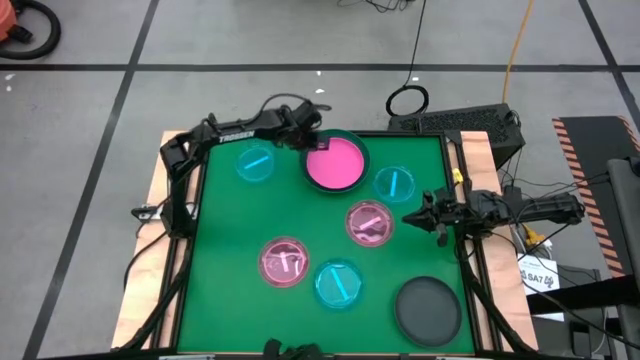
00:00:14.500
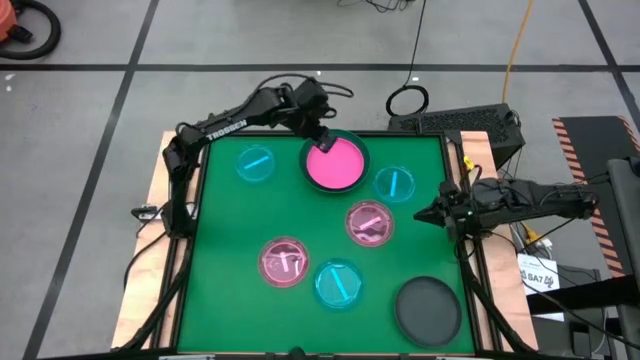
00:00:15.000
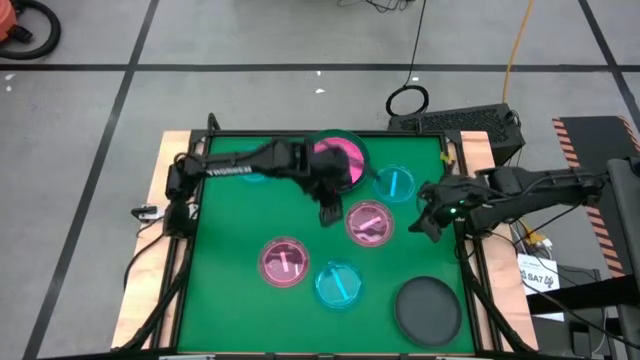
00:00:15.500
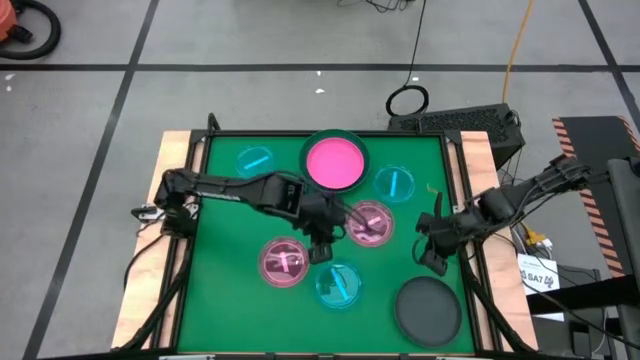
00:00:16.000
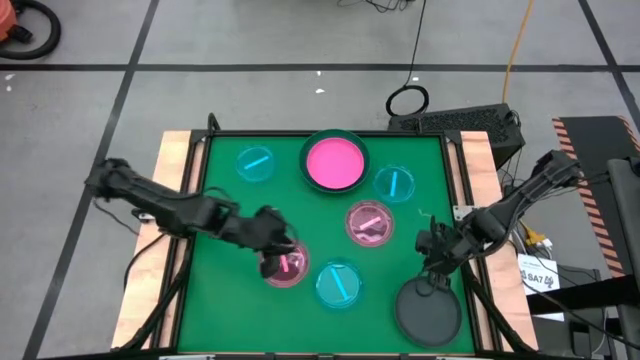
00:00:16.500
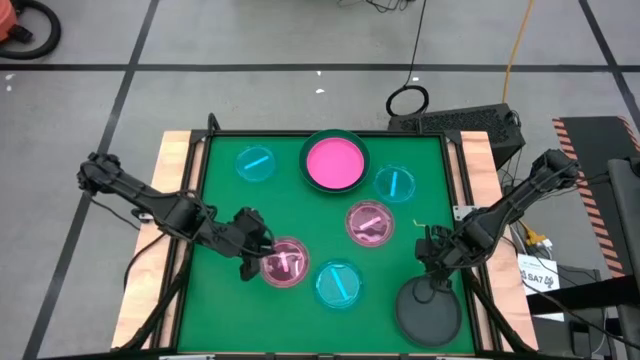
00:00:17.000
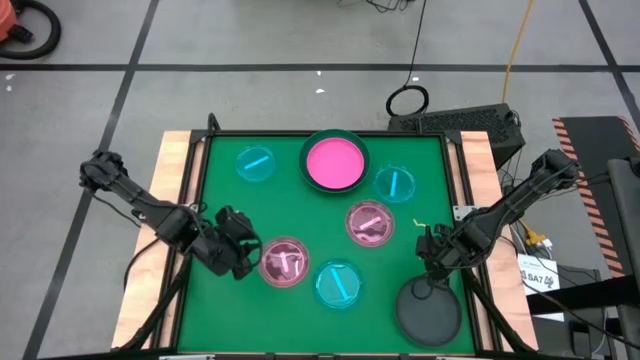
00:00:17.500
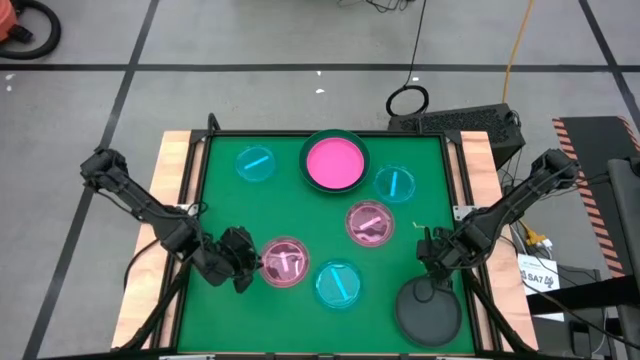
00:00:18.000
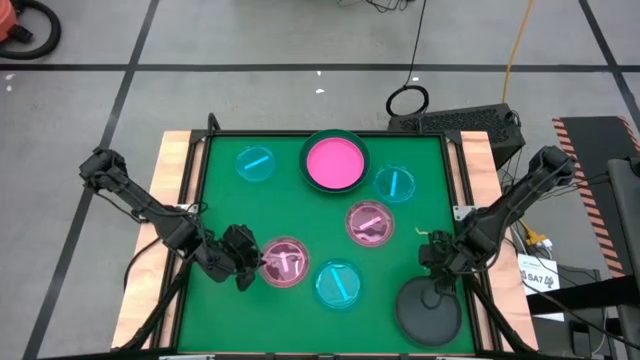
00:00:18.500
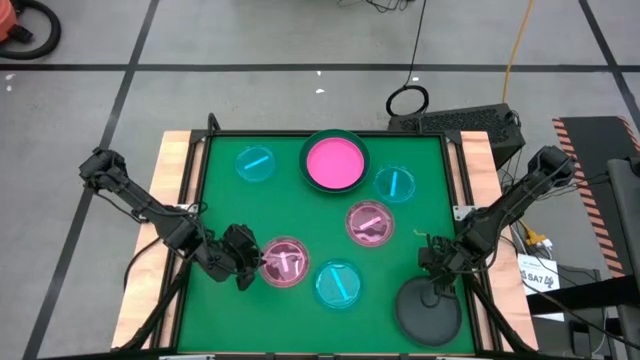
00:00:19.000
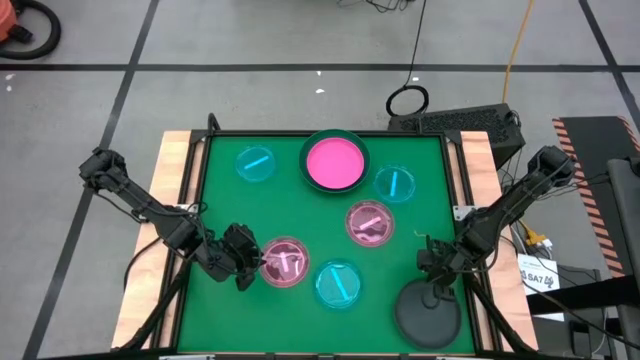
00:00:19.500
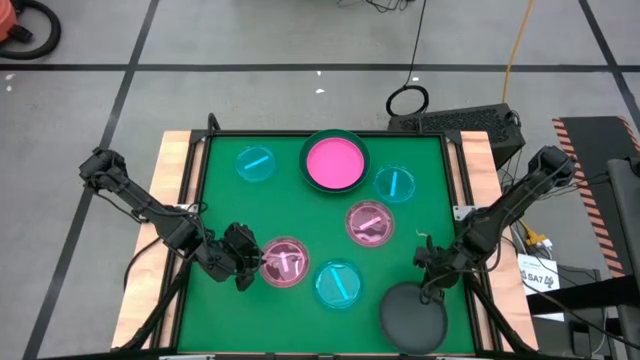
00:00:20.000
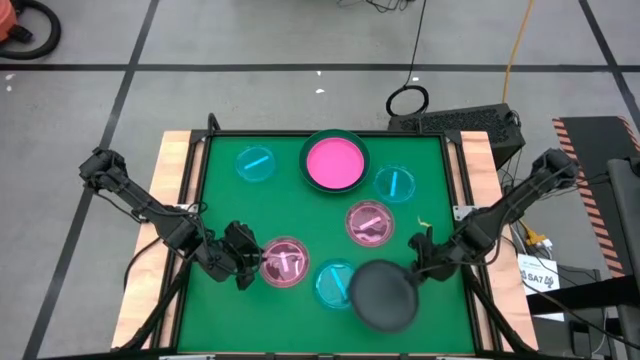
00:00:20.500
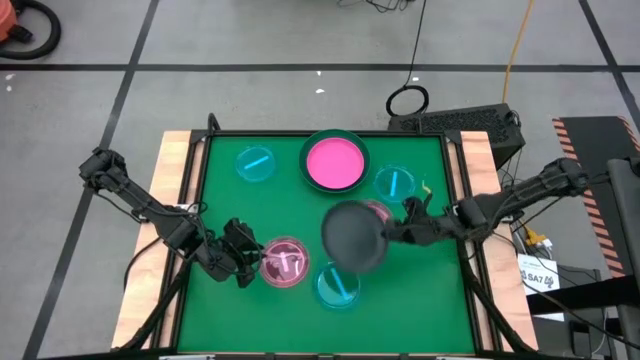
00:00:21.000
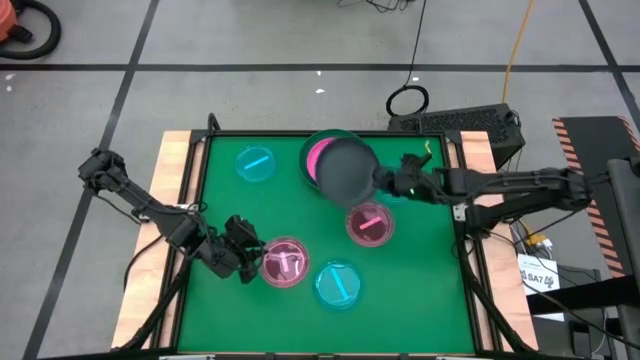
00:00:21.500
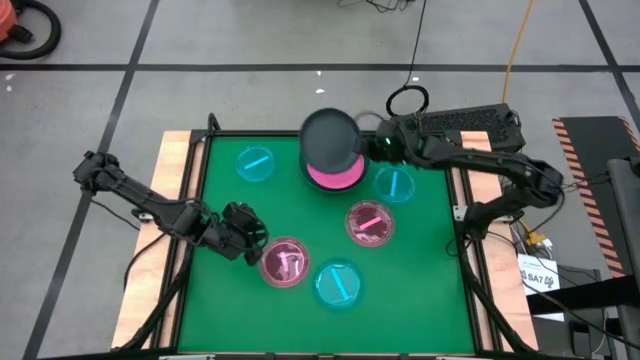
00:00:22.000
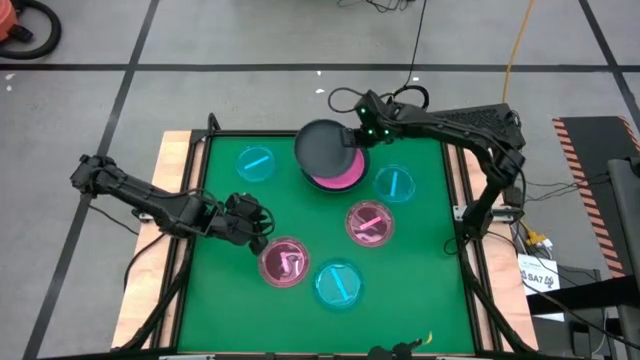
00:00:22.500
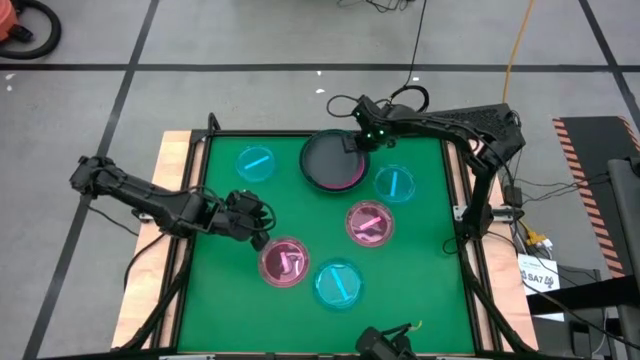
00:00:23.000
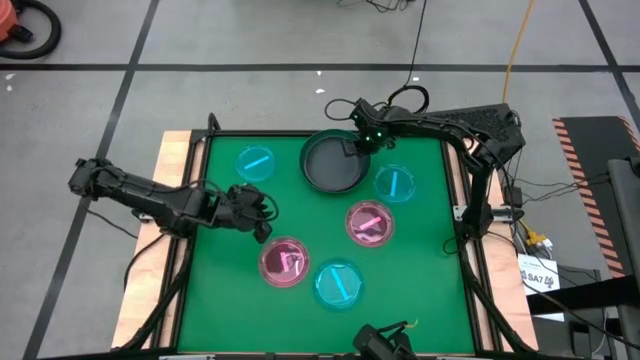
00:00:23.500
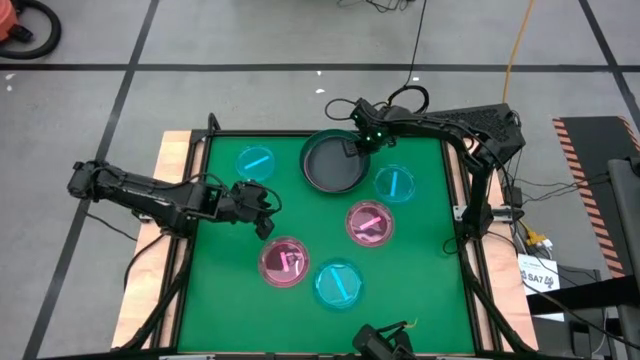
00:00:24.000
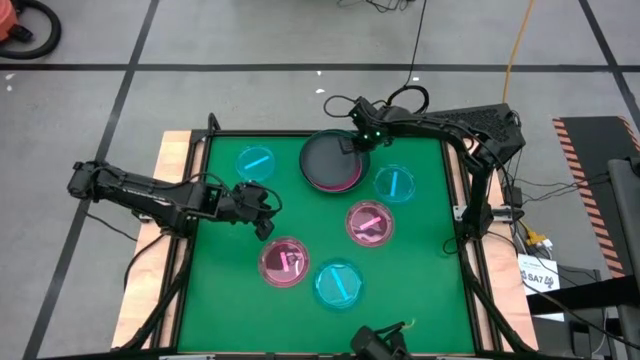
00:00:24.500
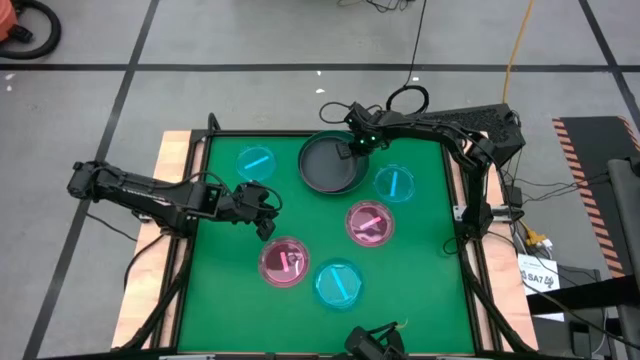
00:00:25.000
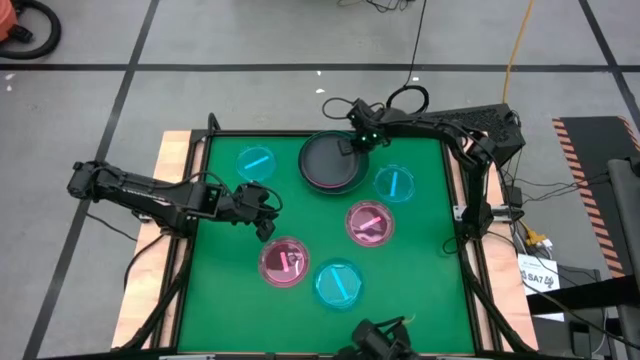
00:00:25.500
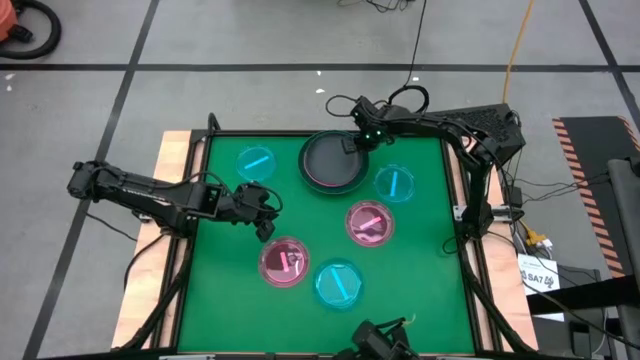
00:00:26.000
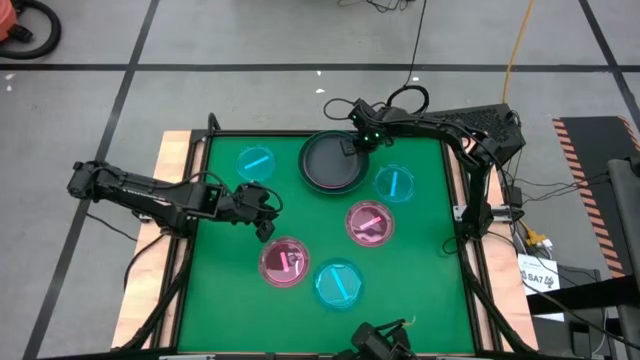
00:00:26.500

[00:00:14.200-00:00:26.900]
Task: Stack plastic plates
Stack the black plate on top of the pink plate

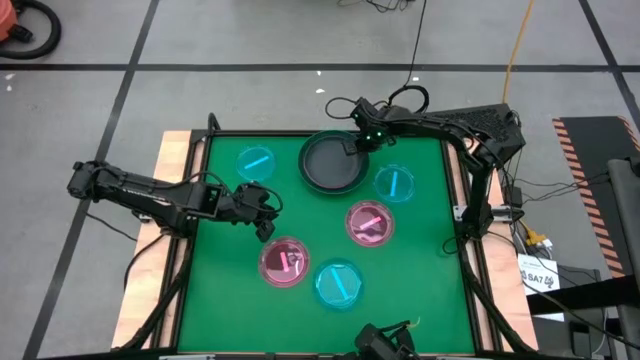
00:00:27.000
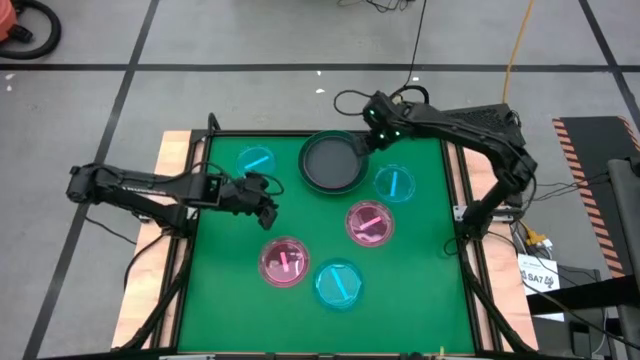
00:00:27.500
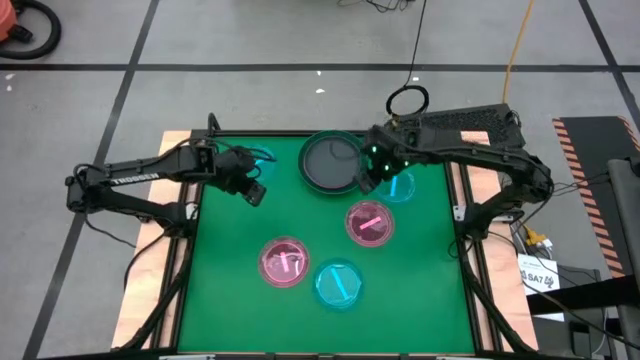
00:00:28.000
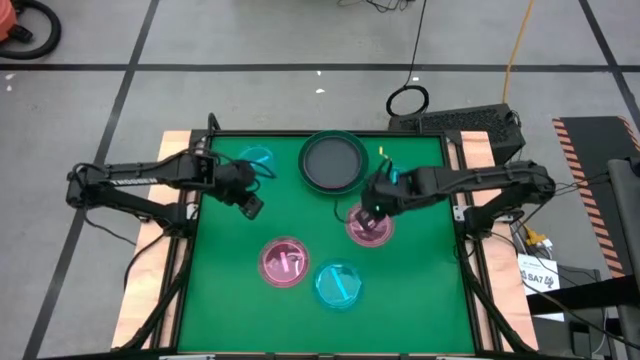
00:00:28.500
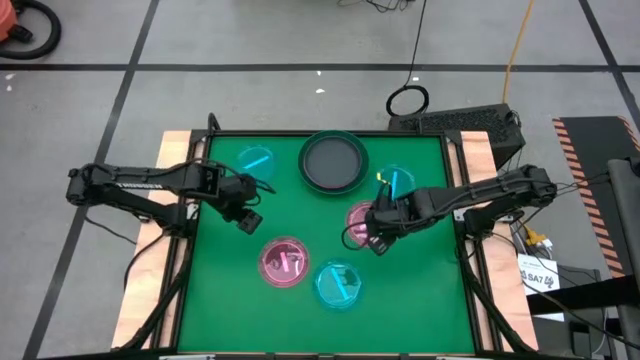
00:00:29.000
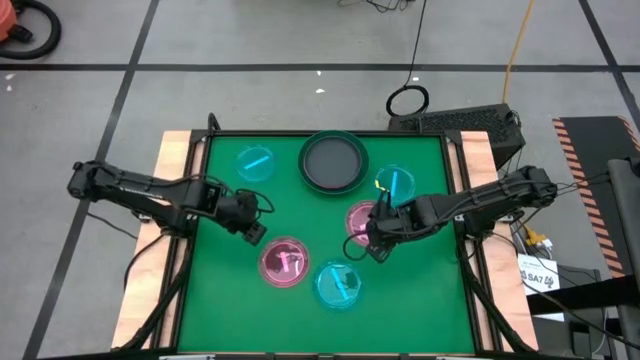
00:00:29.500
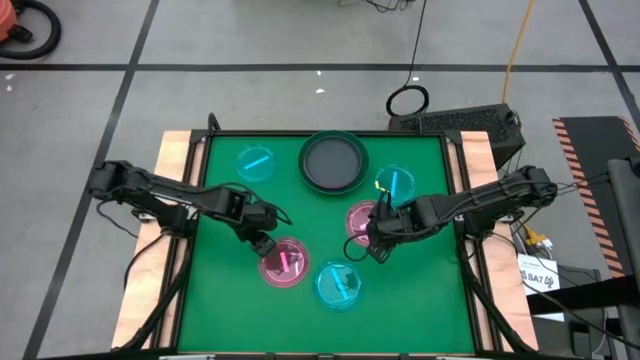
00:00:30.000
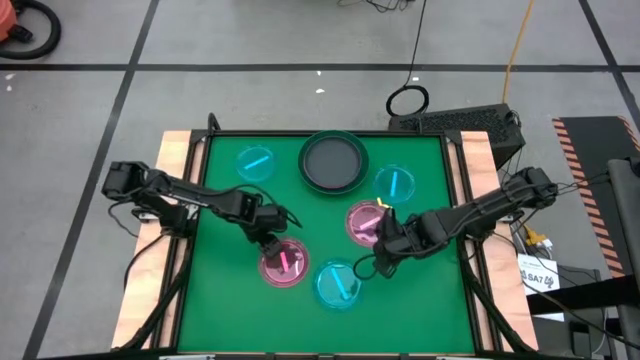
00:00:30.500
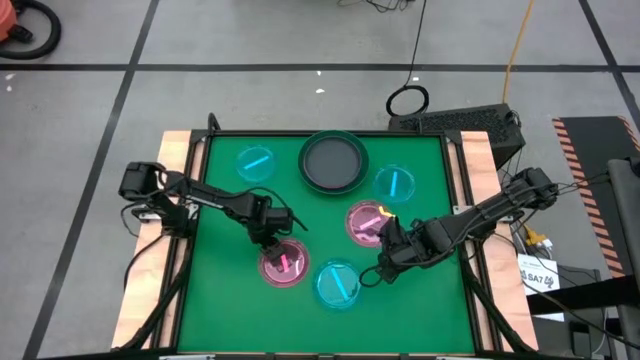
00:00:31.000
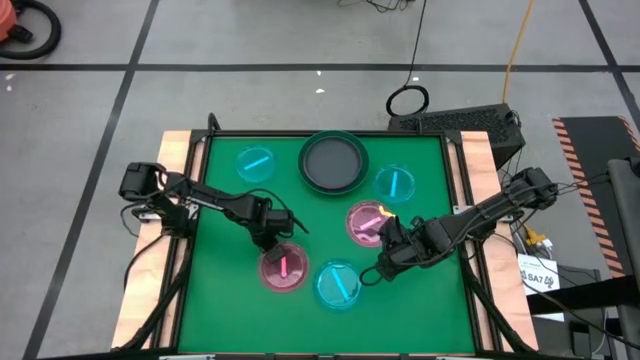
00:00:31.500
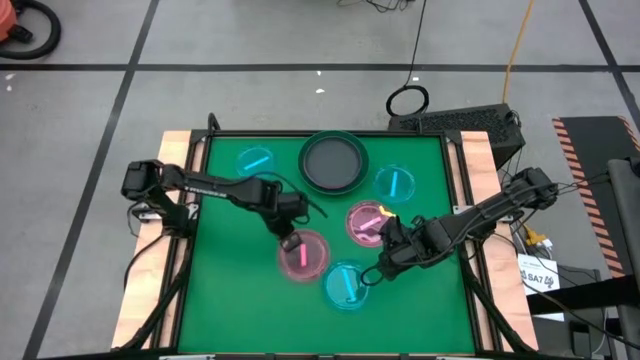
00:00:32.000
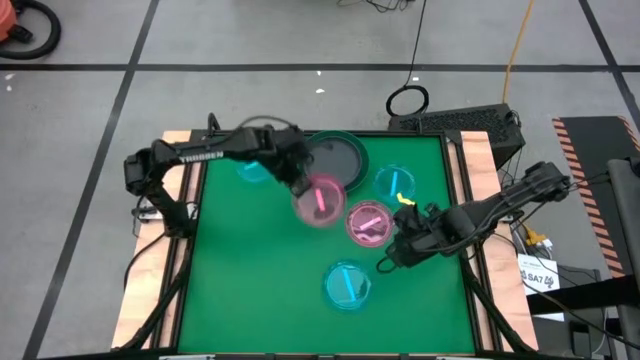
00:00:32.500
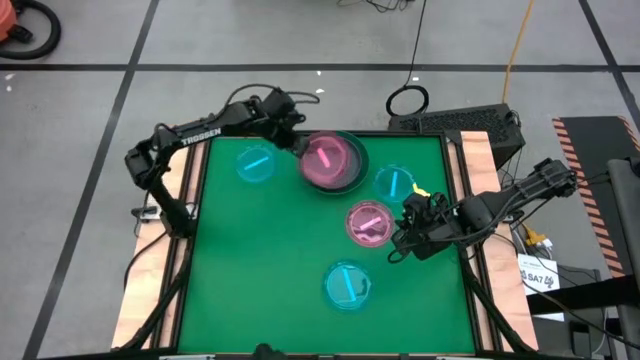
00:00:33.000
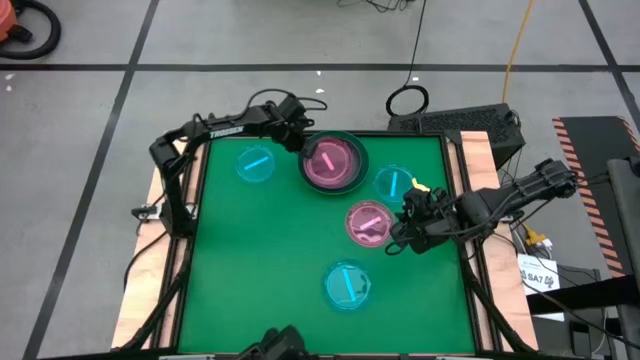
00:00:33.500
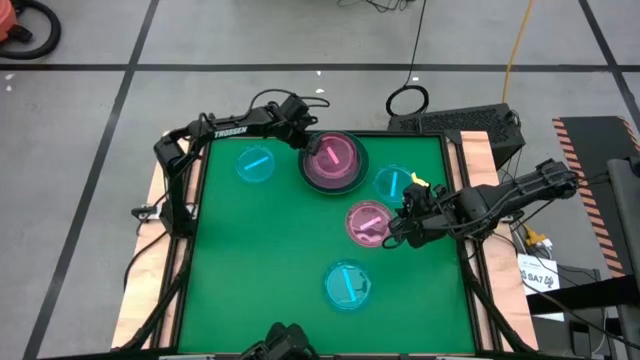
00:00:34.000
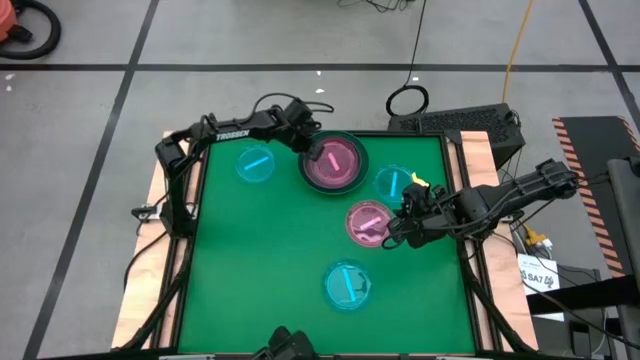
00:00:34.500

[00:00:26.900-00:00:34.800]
Stack the left pink plate on top of the black plate

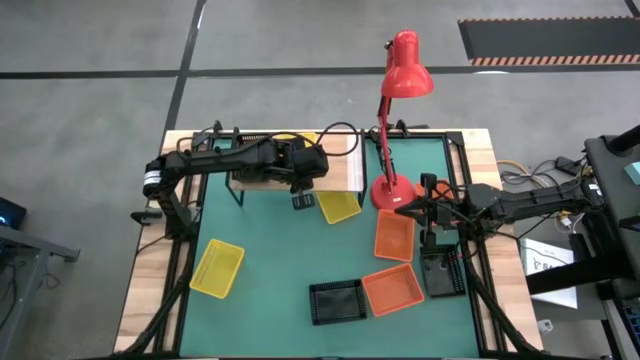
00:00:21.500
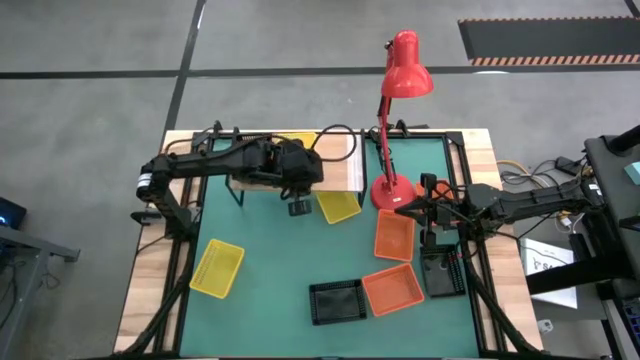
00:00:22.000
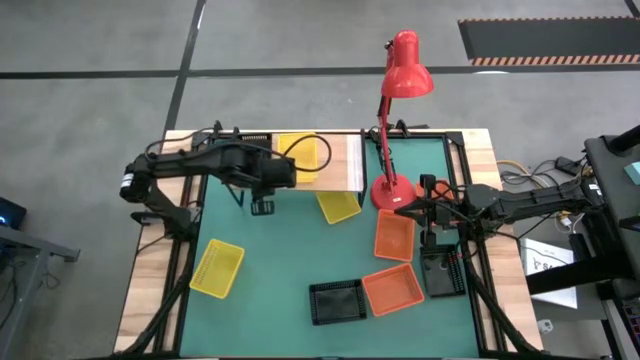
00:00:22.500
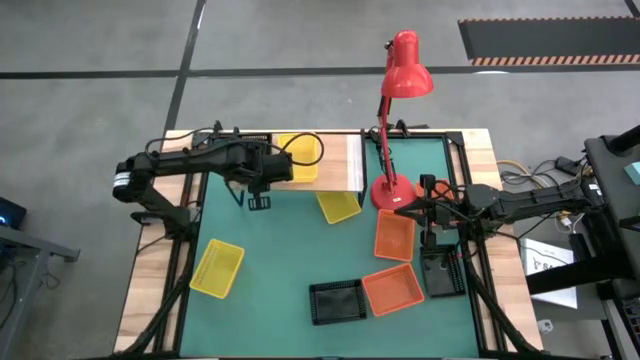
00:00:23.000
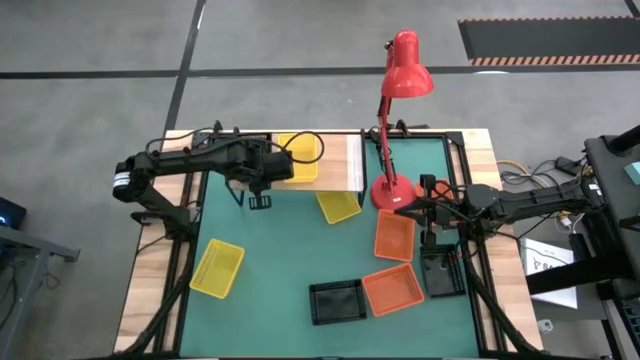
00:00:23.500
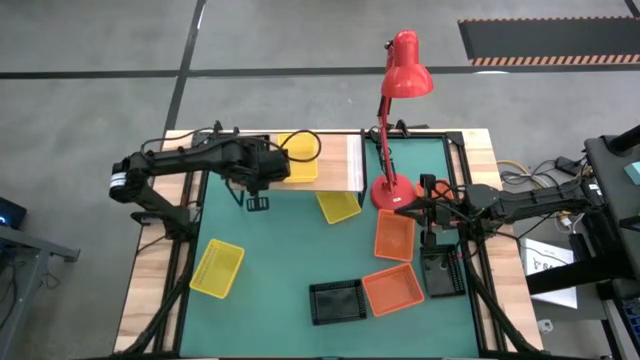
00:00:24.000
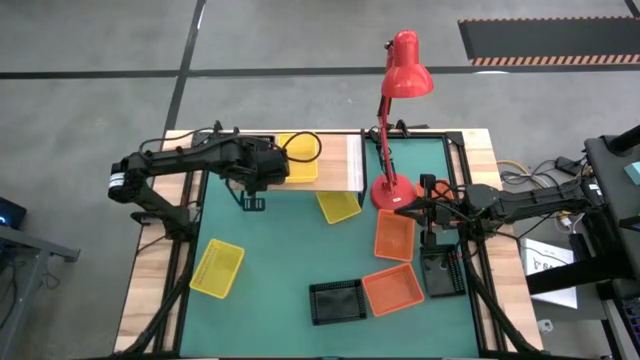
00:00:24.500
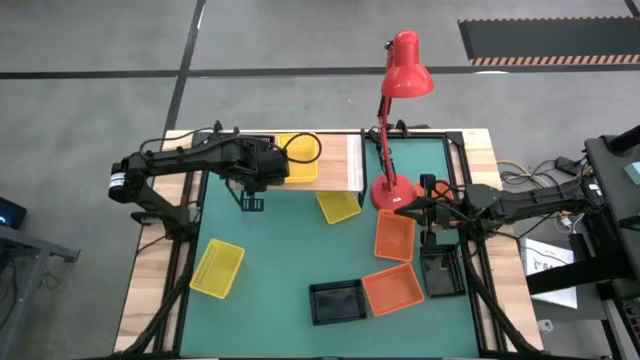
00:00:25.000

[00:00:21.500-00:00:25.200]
Task: Stack baskets on shelf by color
Adjust the black bin on the shelf
